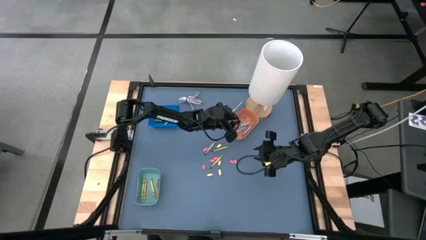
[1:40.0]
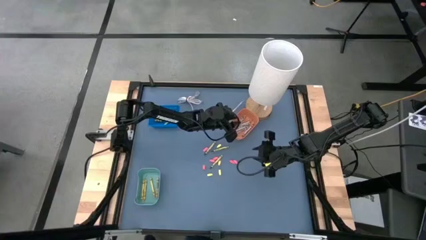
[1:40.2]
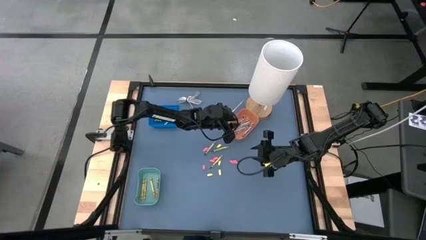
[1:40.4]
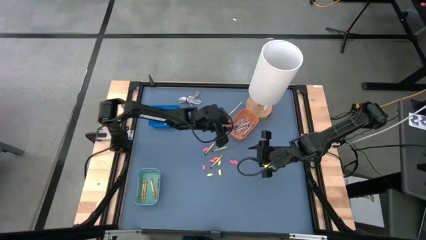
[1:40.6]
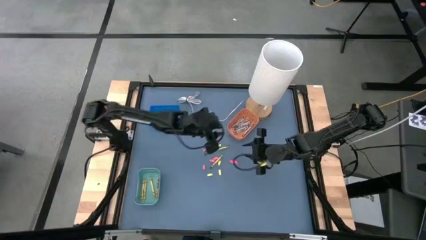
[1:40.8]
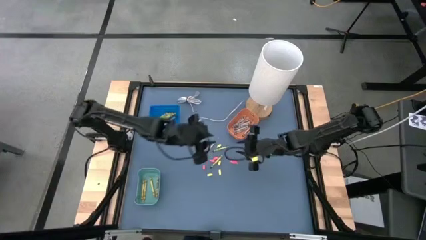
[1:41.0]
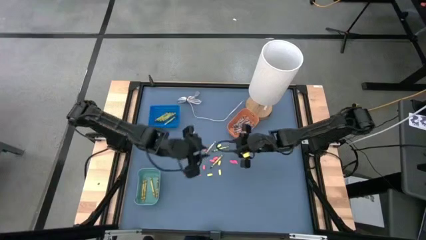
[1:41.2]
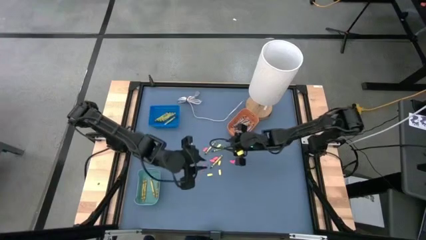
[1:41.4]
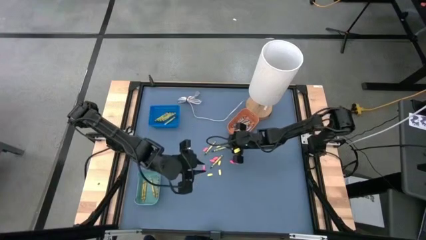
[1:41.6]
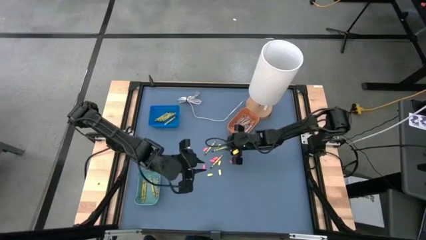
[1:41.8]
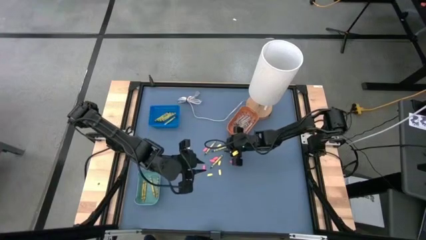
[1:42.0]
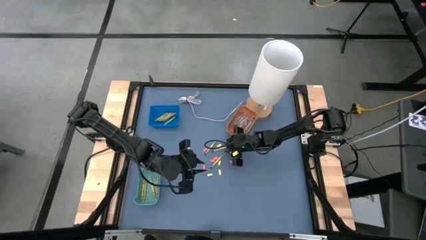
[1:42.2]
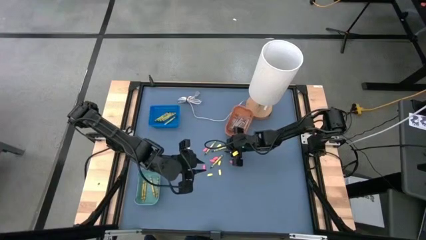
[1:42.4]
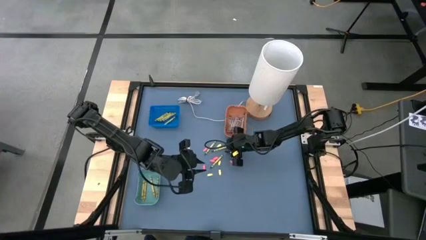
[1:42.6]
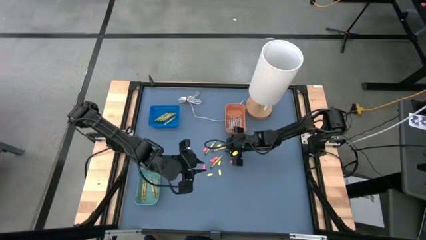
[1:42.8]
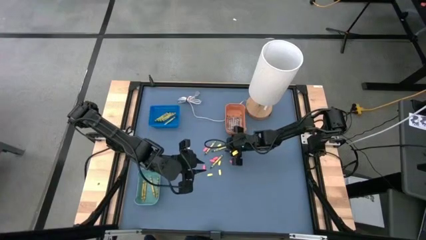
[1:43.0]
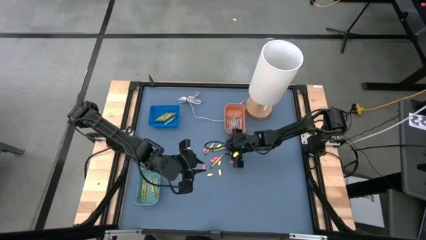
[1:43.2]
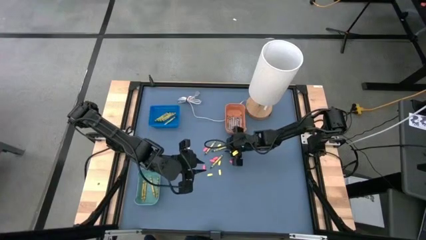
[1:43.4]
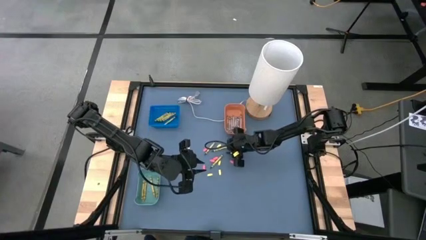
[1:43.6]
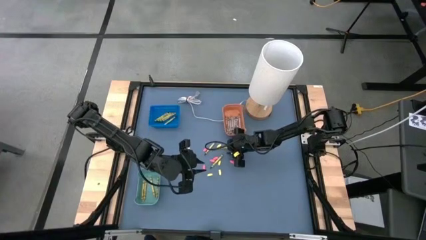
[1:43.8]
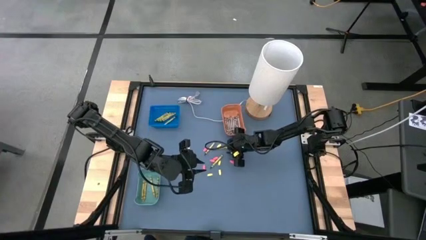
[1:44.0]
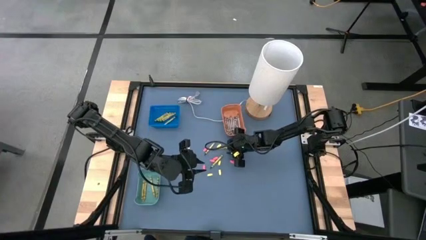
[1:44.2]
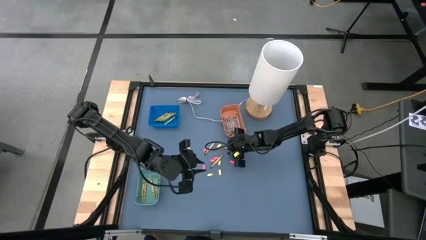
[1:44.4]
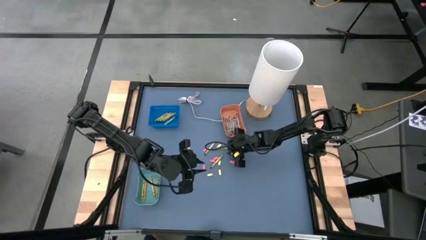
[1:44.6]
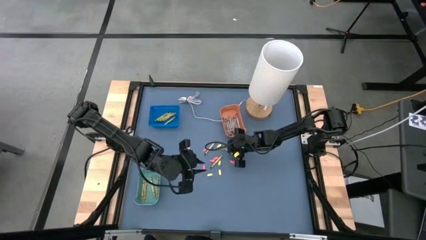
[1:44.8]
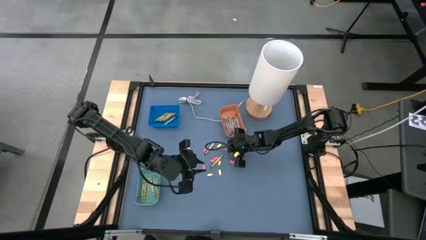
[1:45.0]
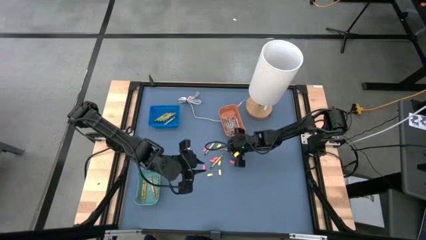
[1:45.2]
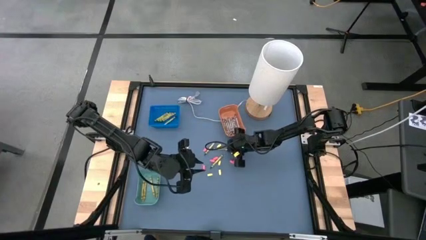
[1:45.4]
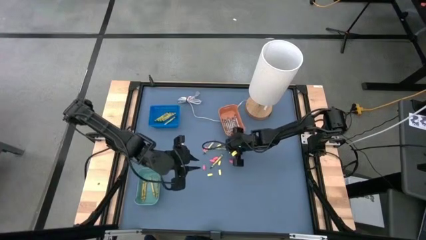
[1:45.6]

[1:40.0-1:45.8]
Task: Sort crayons
Put the green crayon into the blue bin

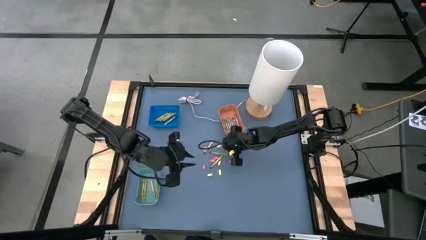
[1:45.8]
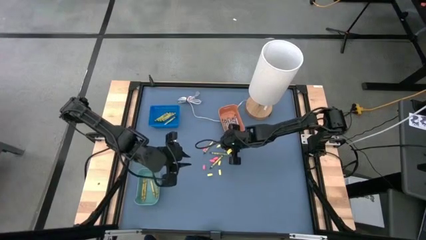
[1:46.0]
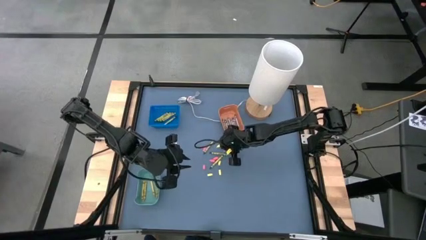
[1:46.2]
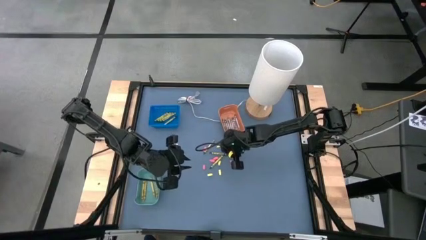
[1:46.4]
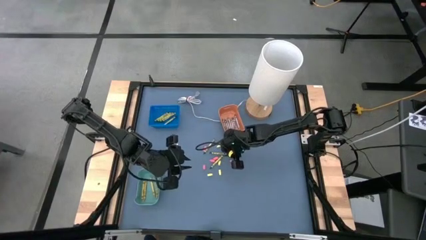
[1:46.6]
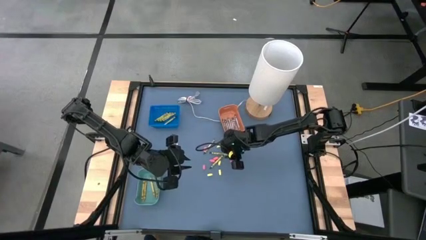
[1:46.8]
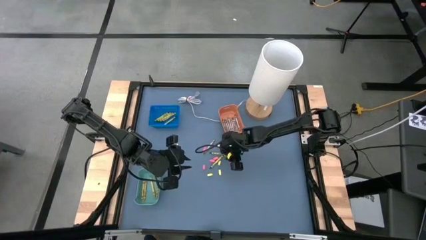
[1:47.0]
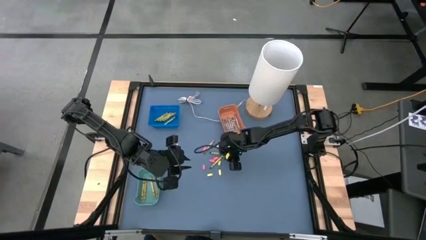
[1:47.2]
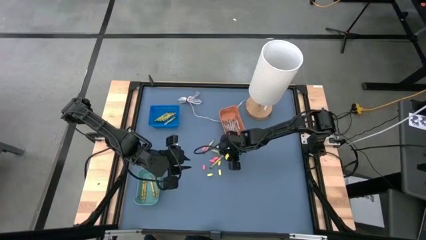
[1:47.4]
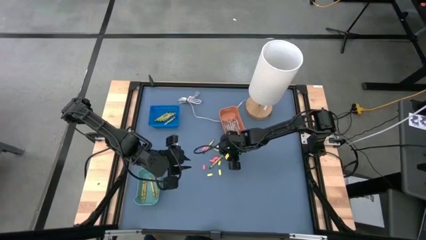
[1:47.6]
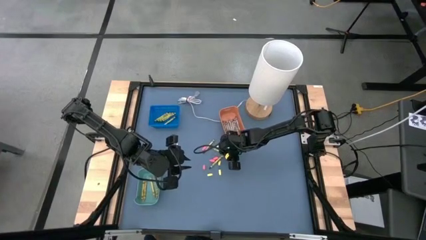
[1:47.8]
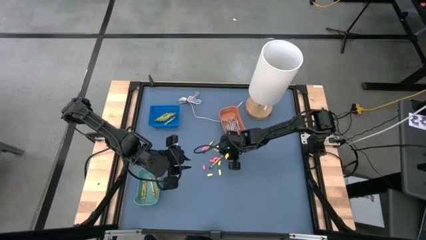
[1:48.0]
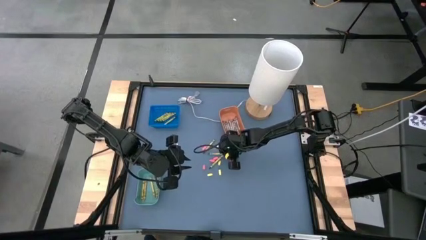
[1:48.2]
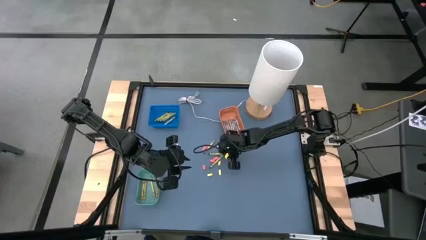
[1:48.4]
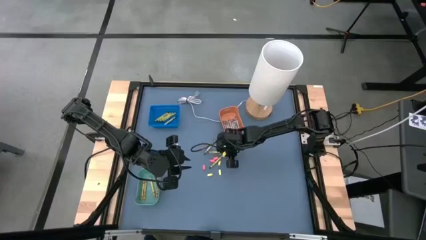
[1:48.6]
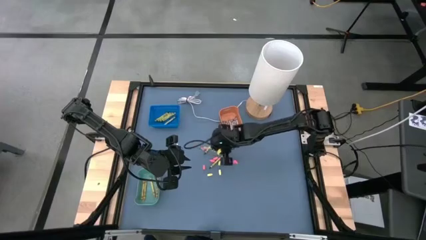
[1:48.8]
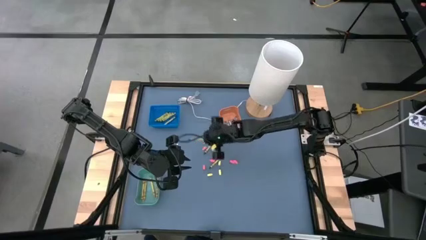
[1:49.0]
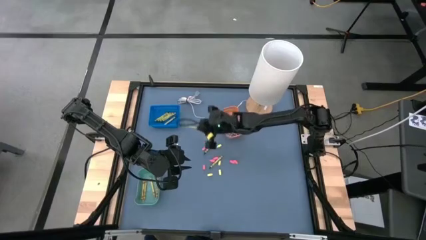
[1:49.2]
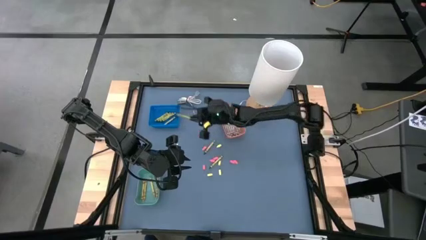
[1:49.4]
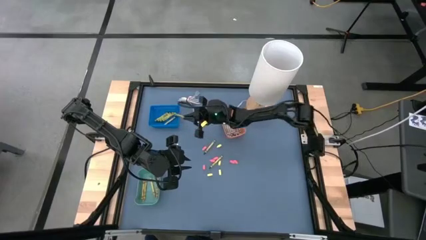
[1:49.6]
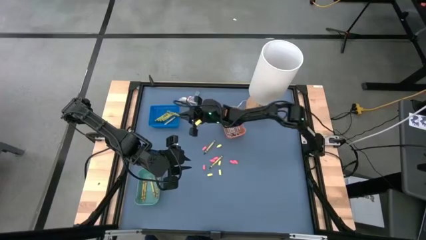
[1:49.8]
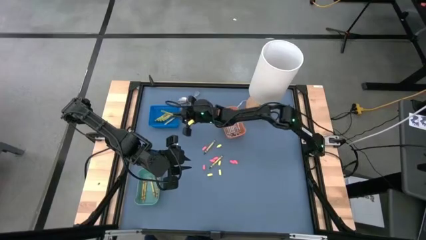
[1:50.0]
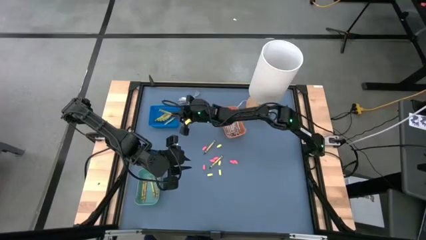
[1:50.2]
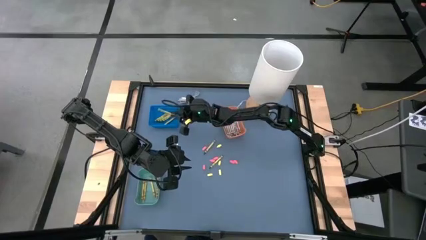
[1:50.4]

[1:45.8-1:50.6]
Put the green crayon into the blue bin

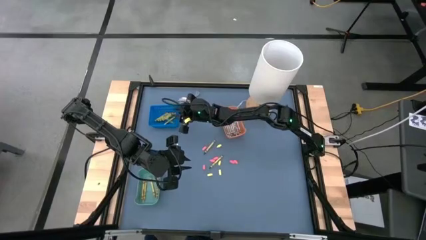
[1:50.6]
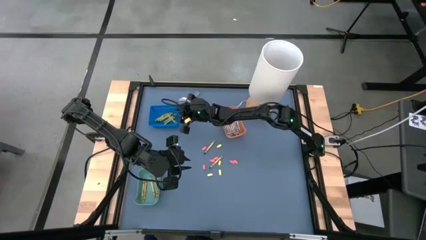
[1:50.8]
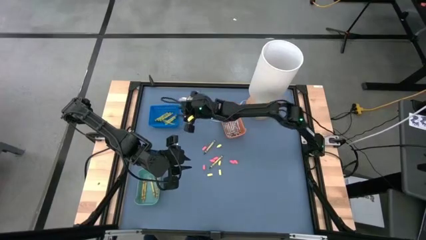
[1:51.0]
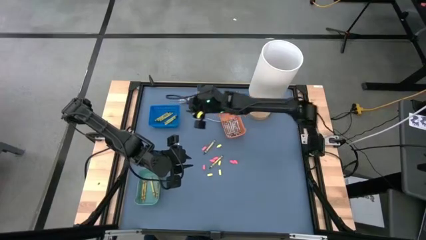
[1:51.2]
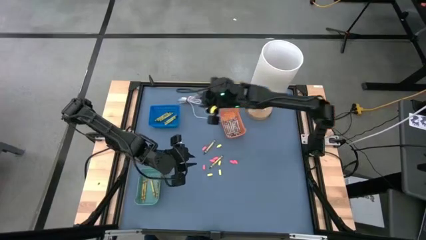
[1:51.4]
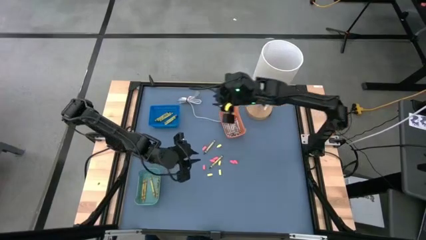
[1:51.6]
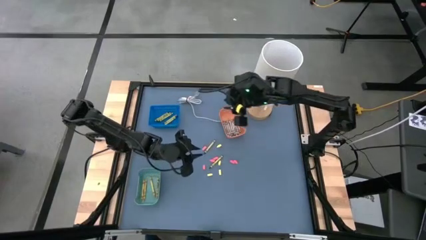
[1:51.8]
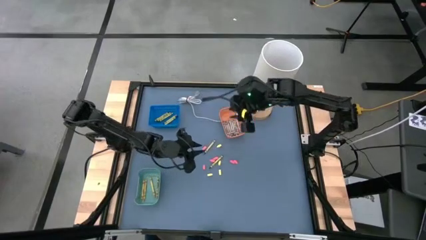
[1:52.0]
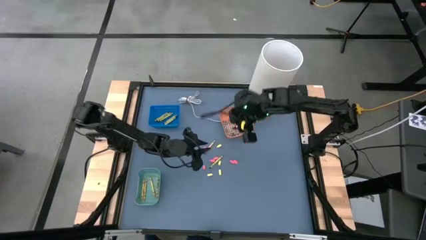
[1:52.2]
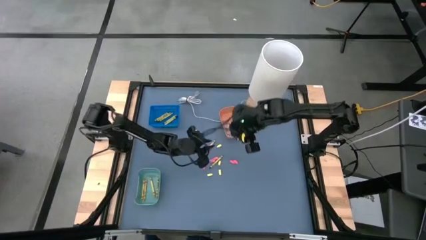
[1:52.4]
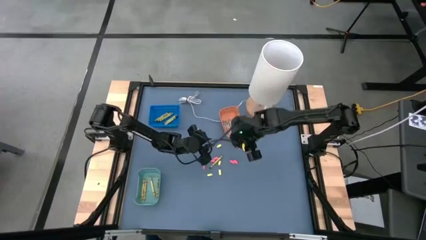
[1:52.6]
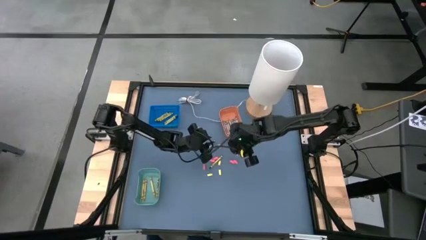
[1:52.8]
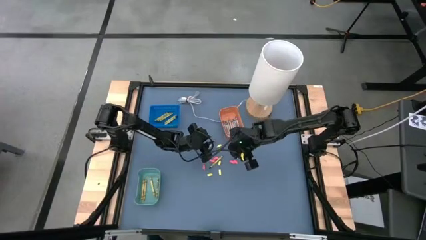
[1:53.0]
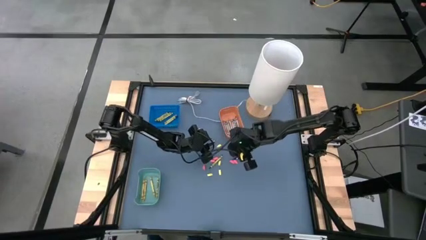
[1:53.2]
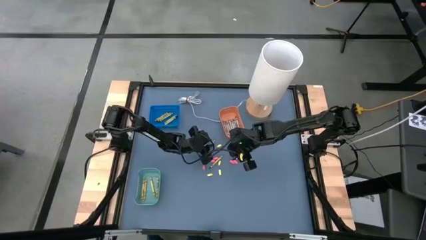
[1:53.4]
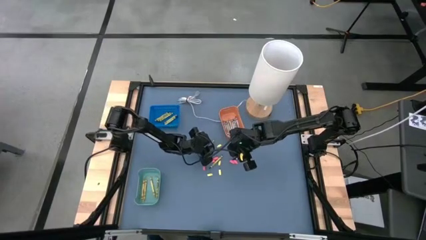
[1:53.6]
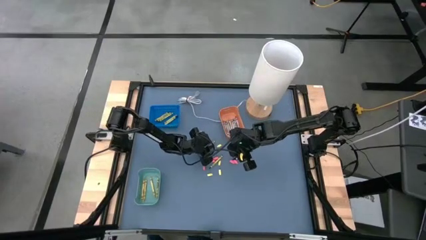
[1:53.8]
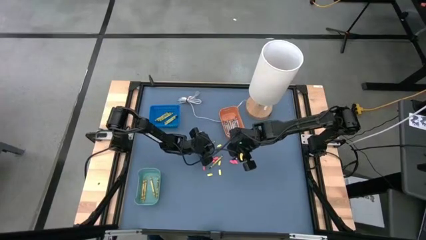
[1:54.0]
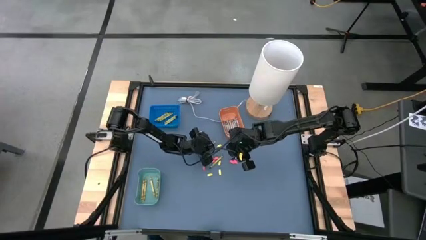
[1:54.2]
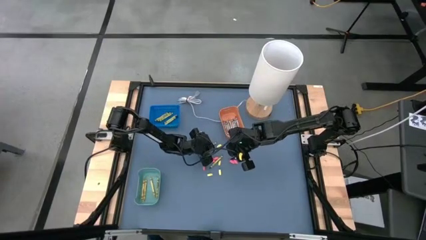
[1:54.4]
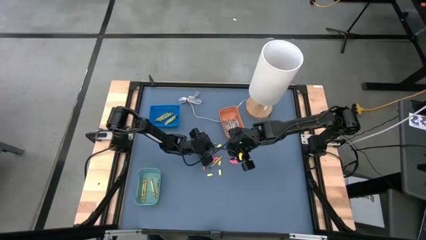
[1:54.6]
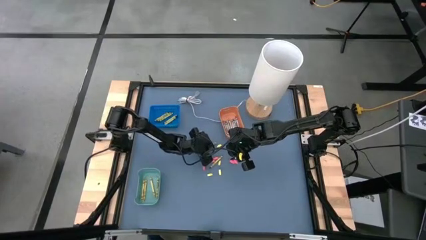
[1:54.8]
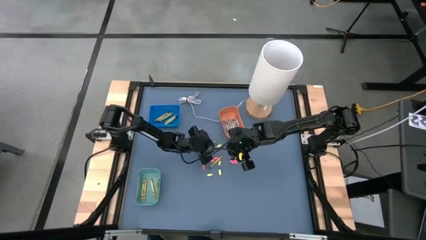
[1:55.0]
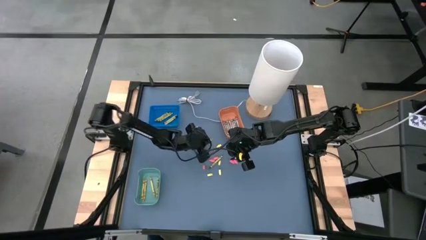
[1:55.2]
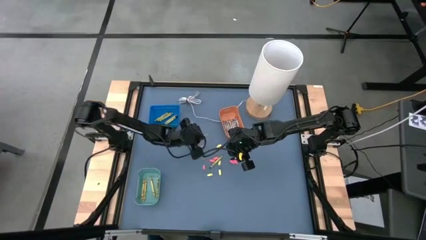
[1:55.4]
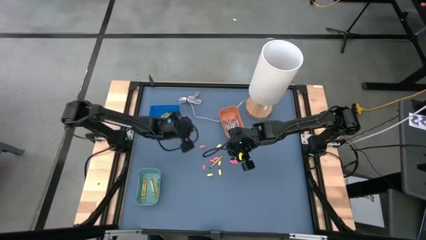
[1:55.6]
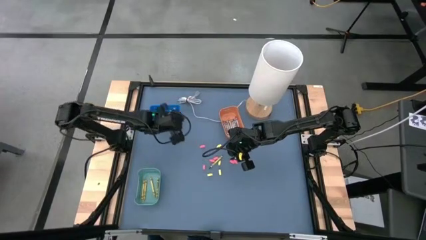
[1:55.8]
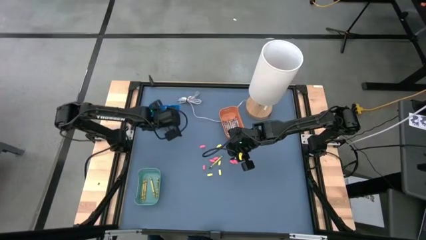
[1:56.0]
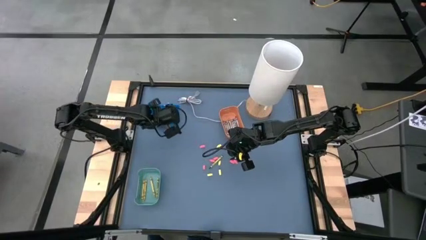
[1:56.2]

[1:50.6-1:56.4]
Put the green crayon into the blue bin
